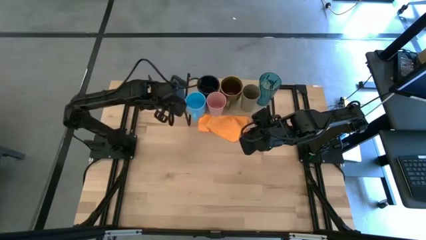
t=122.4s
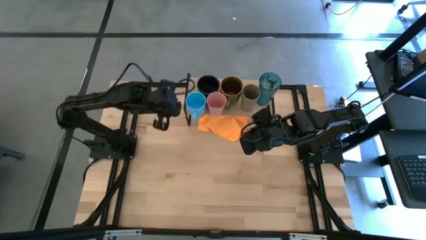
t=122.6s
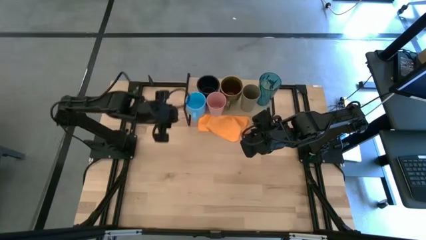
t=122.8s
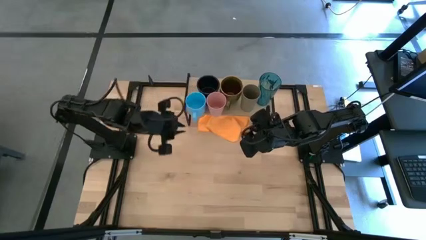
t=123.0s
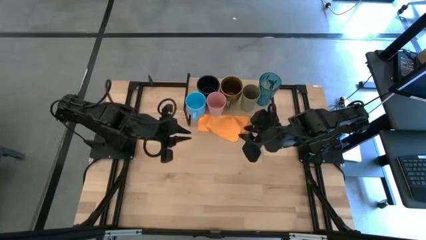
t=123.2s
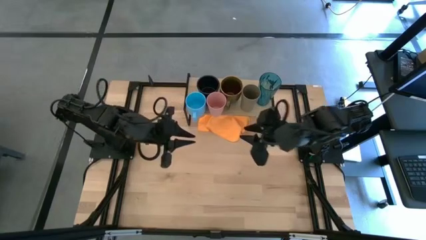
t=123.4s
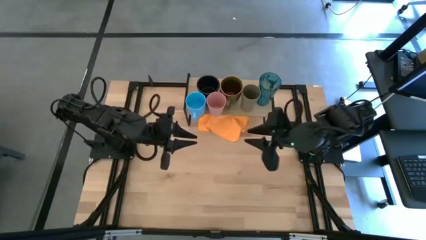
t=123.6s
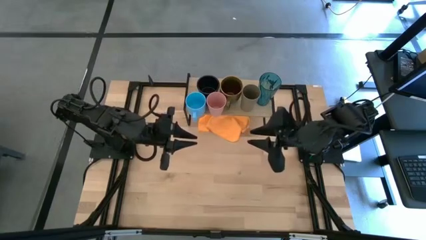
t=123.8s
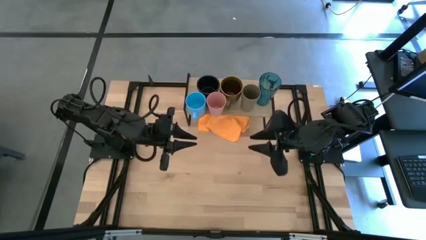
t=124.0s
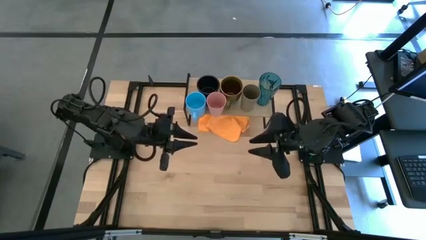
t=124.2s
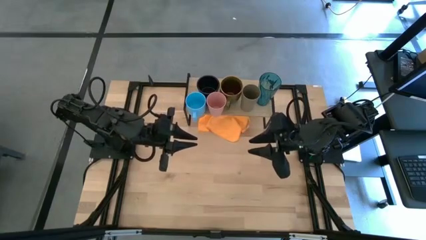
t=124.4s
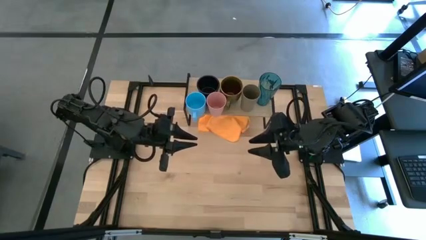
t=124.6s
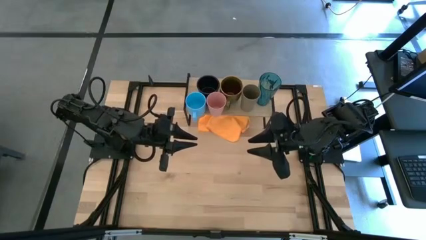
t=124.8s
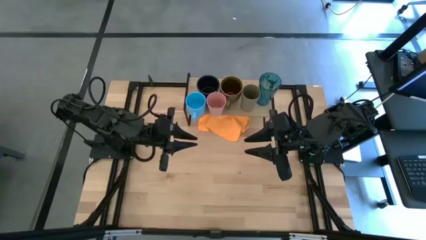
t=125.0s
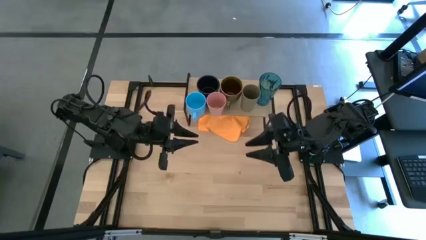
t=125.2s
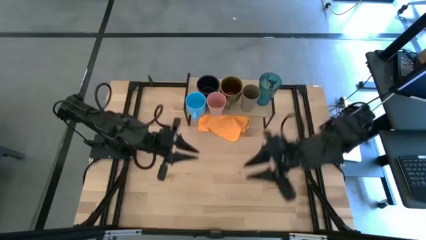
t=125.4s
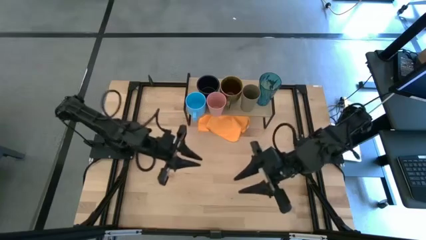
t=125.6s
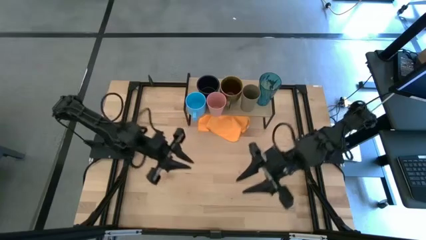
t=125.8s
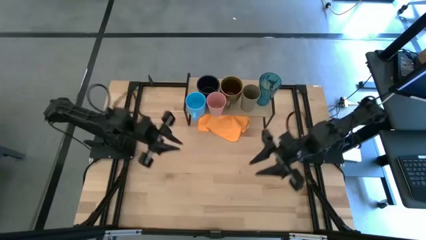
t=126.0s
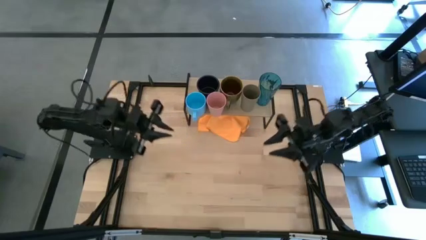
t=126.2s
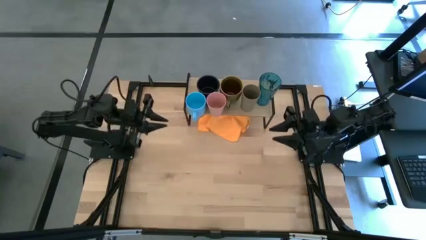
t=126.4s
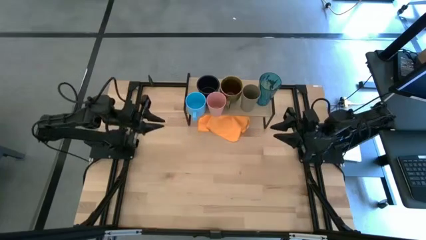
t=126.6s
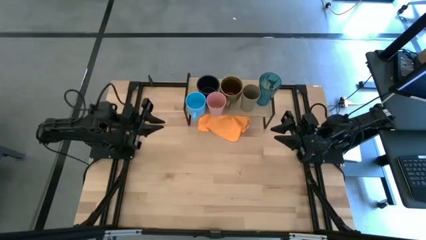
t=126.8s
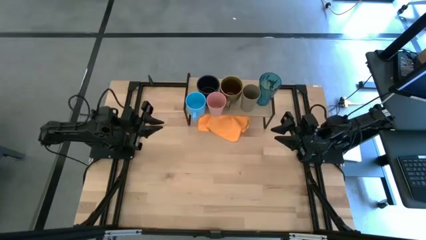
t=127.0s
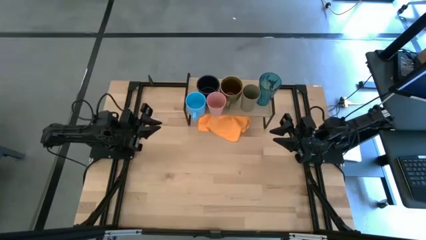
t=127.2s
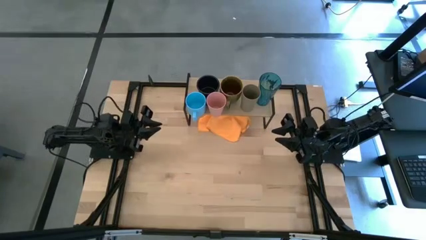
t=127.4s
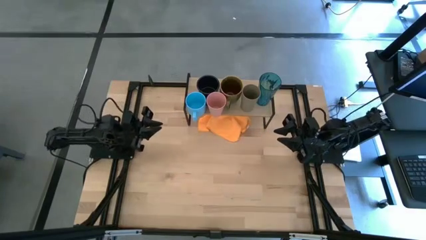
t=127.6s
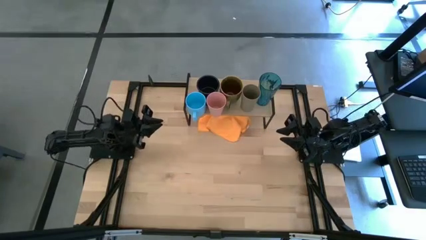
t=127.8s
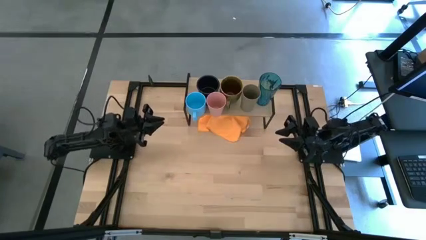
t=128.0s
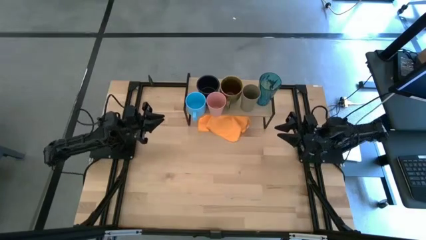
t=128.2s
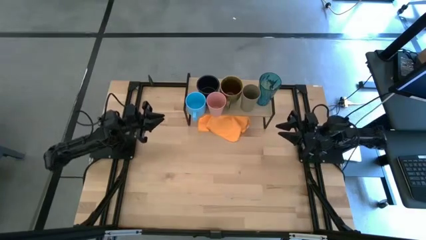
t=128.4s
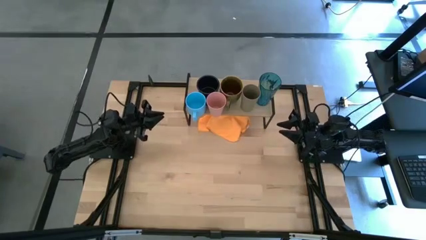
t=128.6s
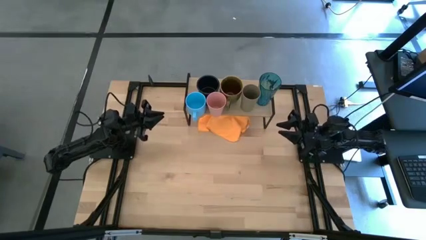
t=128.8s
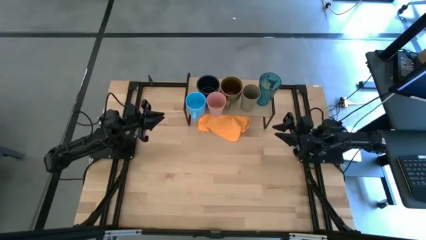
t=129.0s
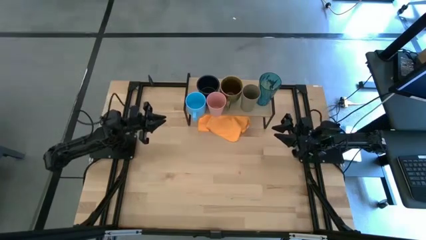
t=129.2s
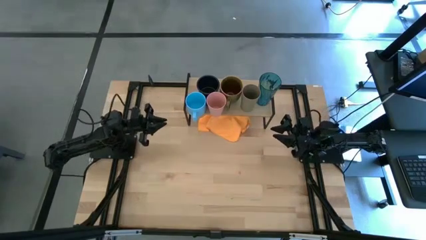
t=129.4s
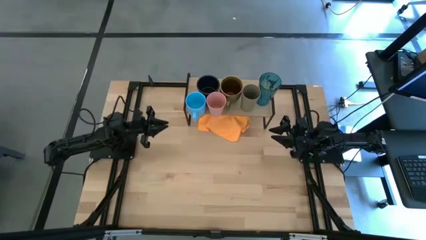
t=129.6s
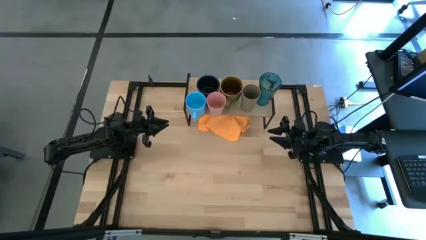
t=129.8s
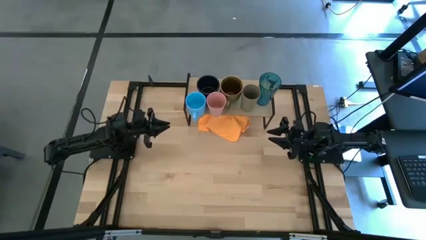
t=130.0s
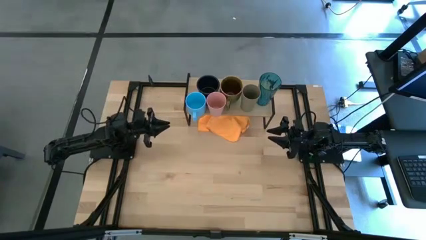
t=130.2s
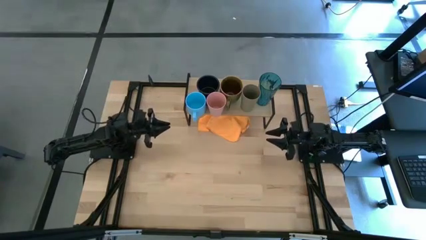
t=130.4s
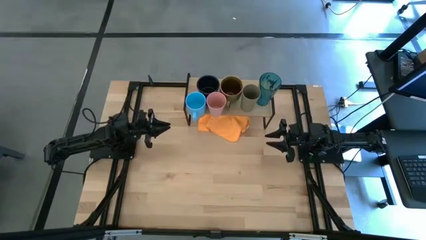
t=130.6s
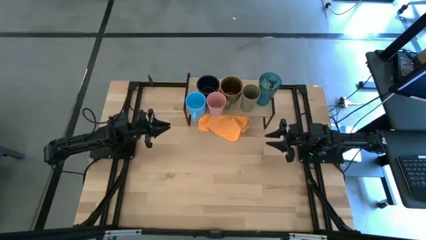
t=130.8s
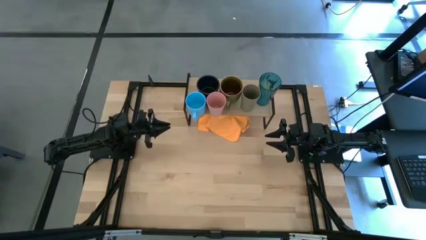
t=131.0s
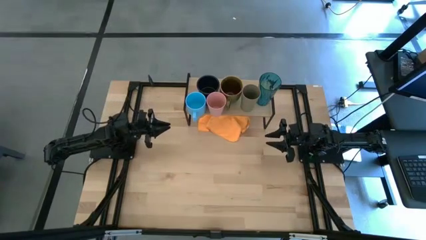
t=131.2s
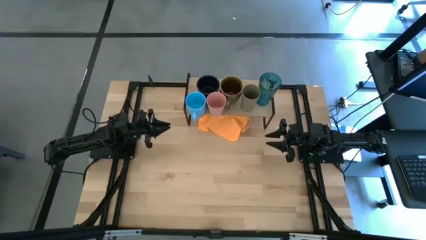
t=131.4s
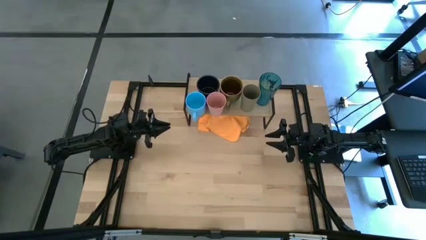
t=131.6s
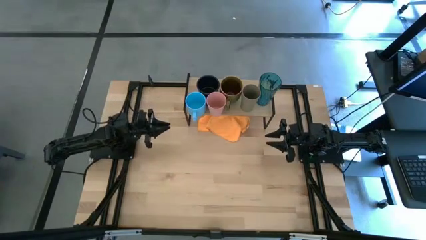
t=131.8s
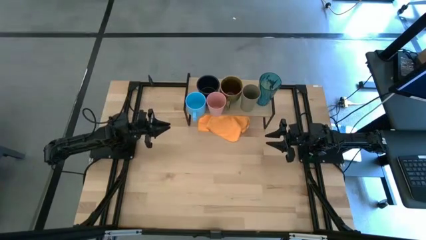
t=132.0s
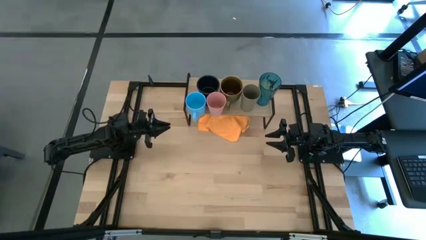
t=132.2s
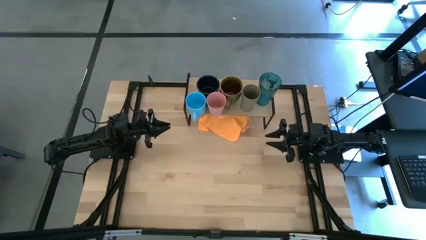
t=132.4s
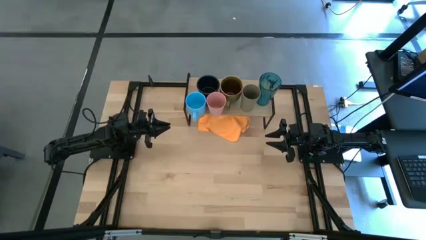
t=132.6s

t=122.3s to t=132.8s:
Task: Stack small to large cups/mugs on shelf
Return to Home Position

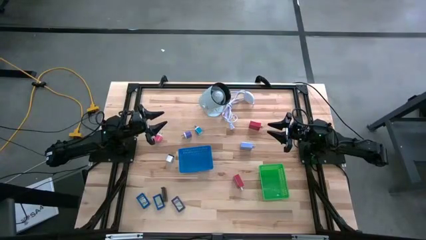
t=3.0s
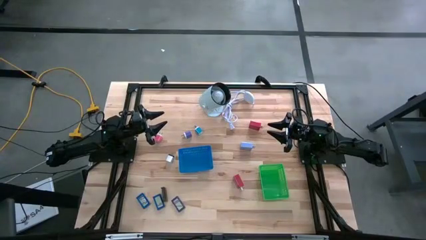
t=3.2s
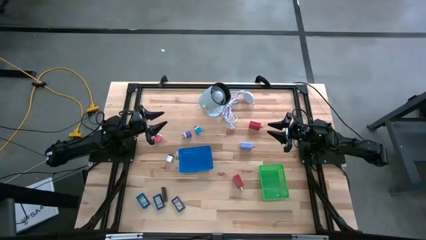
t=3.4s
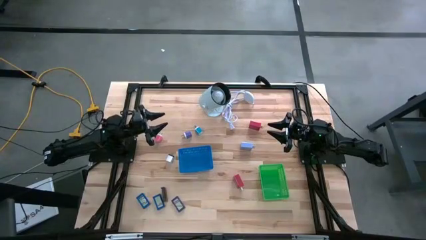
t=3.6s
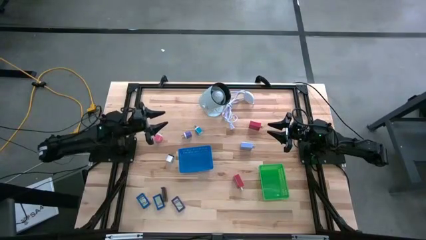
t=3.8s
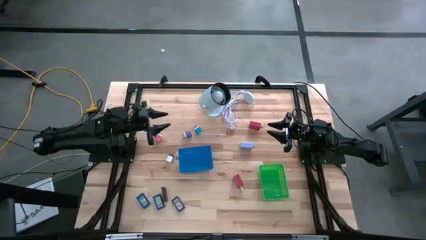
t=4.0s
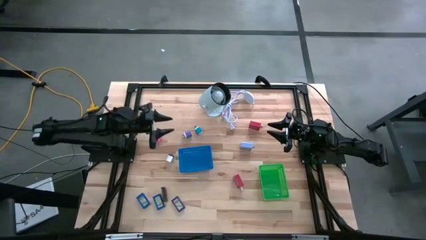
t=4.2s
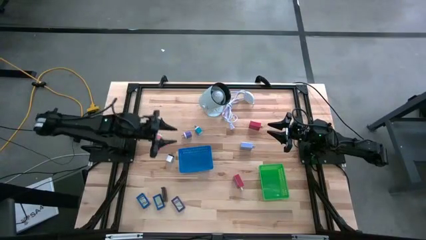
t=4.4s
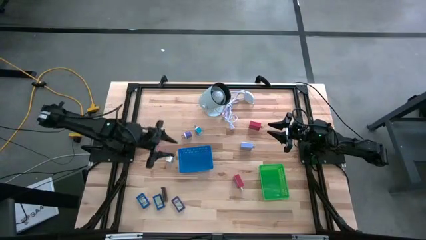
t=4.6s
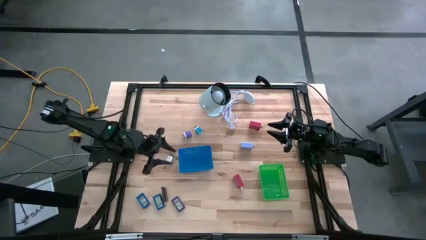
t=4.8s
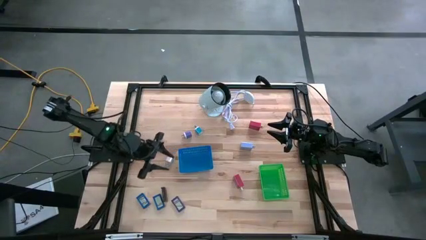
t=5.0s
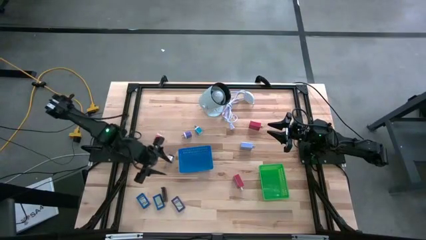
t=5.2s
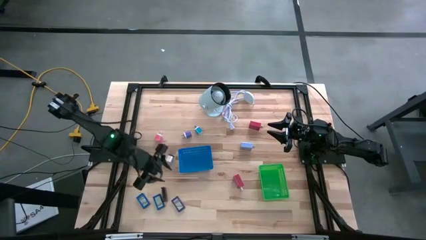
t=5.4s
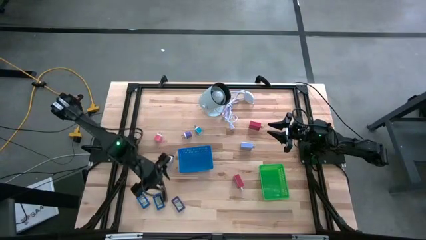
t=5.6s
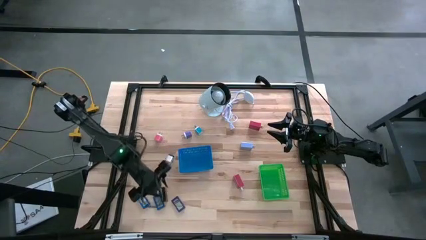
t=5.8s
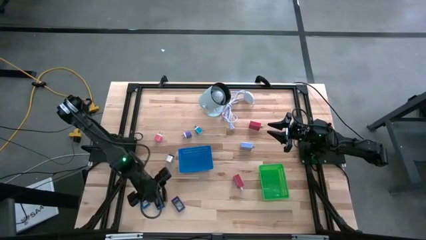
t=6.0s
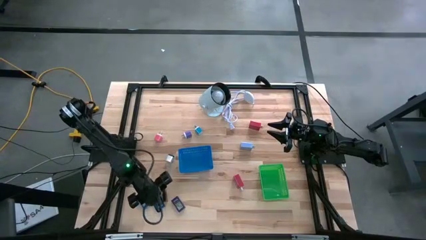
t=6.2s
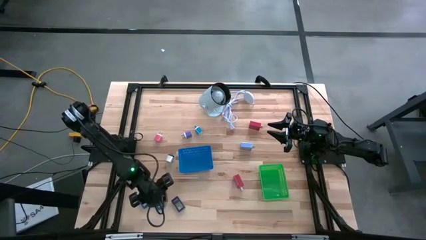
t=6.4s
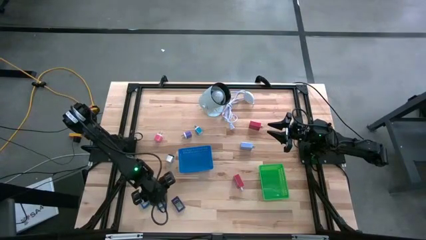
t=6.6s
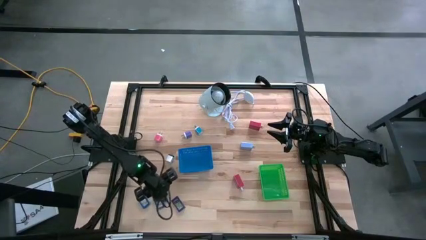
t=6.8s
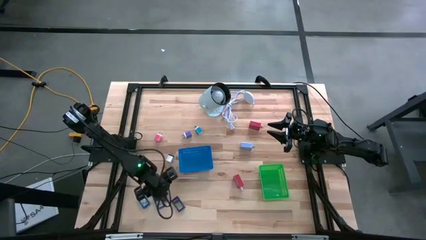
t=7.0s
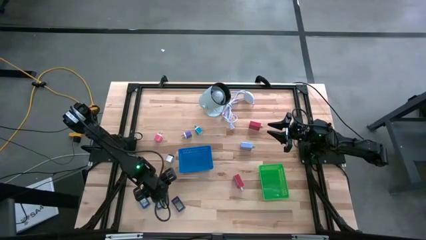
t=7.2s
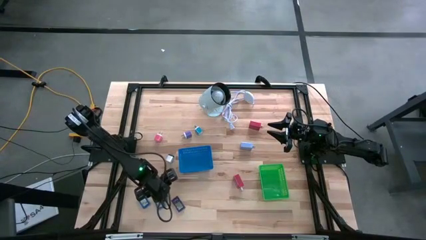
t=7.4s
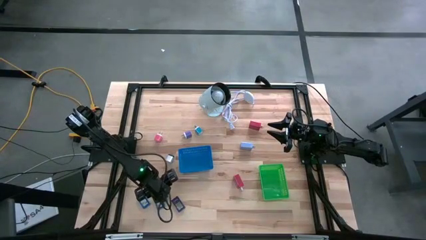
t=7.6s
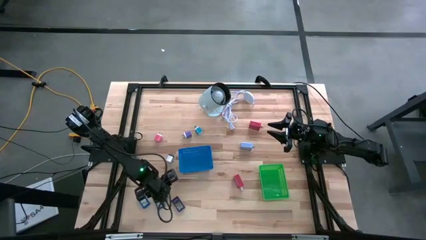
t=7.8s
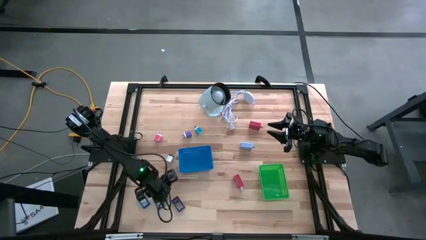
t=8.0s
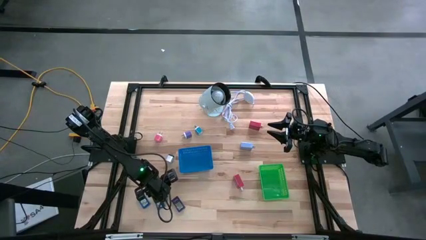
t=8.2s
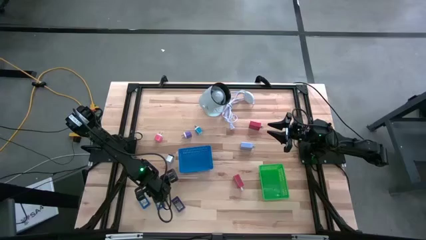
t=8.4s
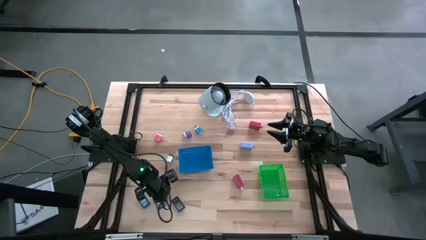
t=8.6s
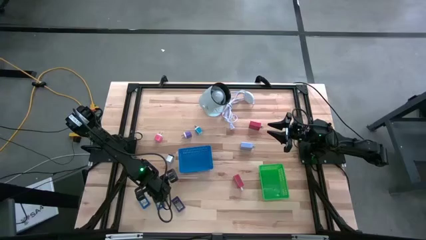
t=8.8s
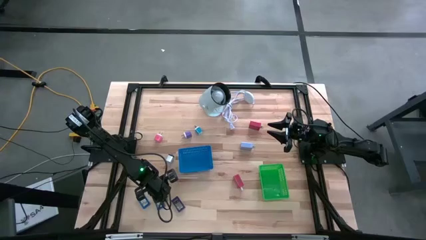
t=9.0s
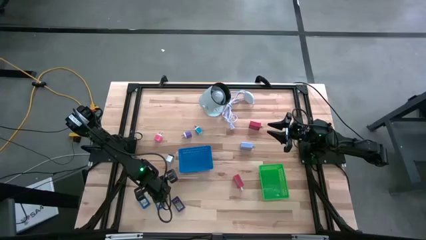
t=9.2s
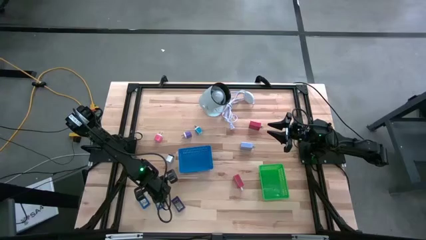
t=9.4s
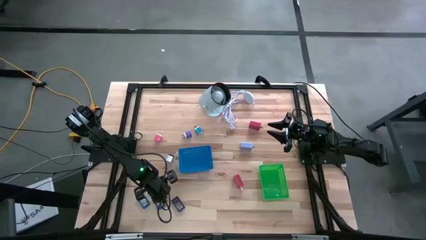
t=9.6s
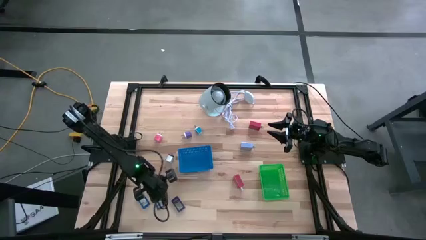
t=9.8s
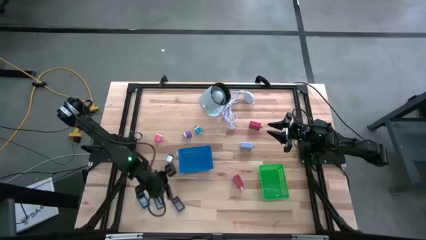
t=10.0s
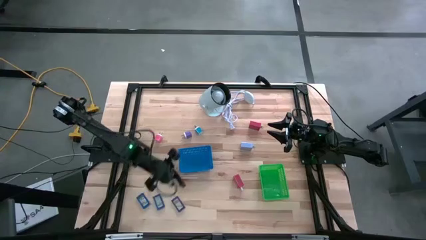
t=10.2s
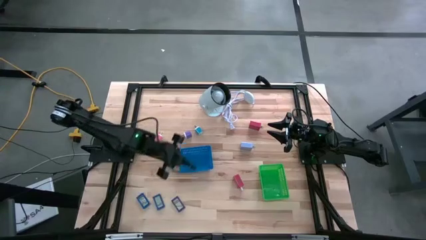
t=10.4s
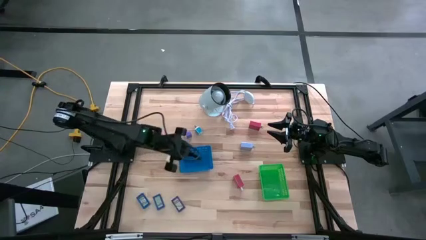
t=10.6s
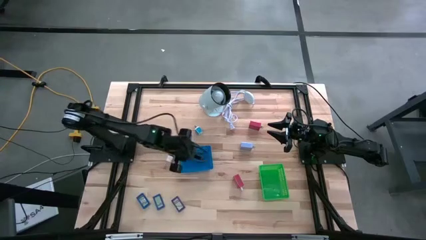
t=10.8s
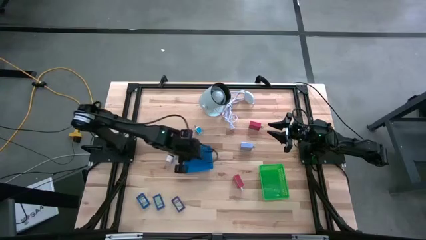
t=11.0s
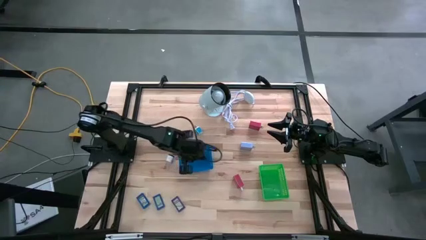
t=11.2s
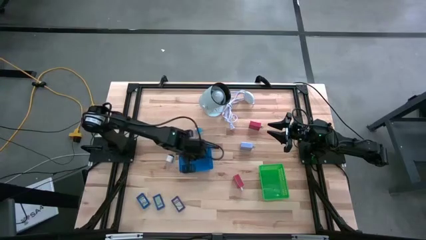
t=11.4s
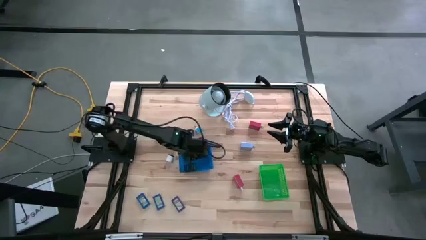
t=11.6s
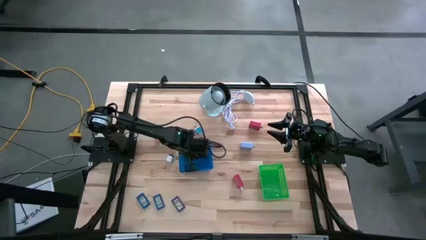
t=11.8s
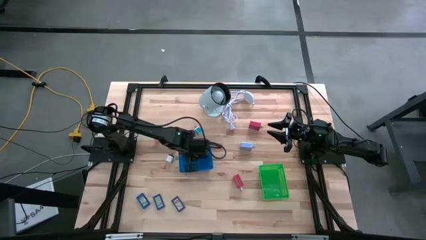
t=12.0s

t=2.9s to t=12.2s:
Task: Pick & Place Office items
Put the black digital clock into the blue bin
